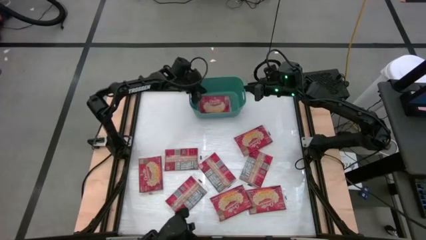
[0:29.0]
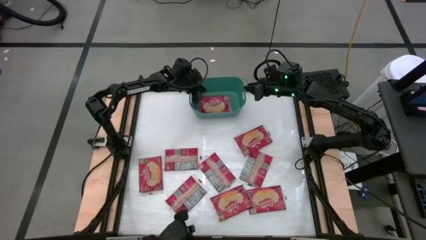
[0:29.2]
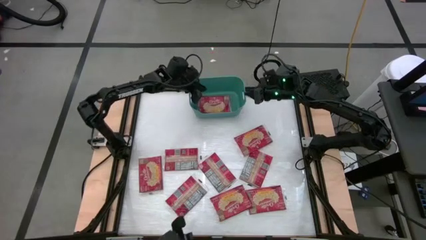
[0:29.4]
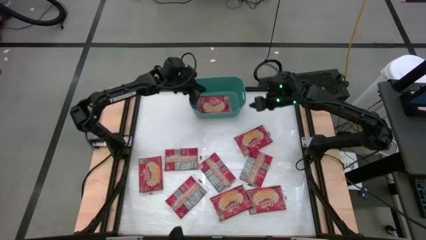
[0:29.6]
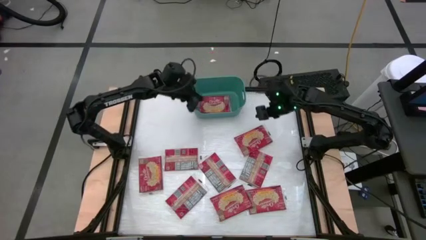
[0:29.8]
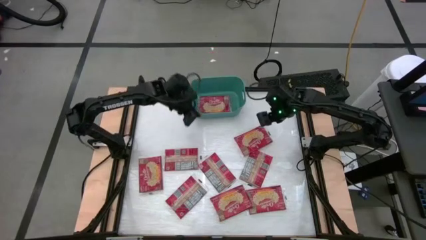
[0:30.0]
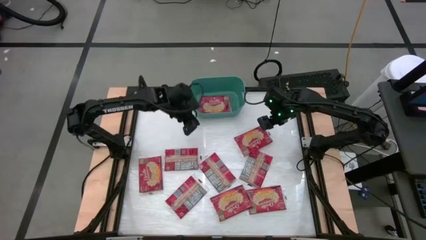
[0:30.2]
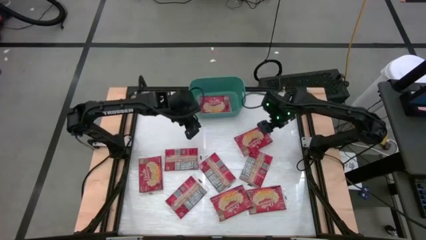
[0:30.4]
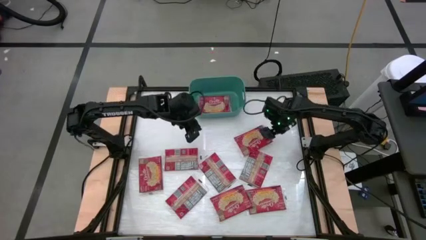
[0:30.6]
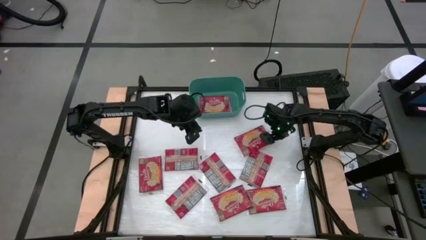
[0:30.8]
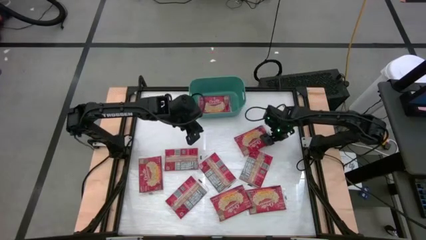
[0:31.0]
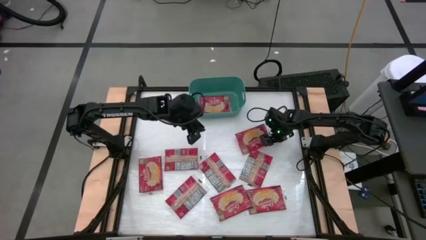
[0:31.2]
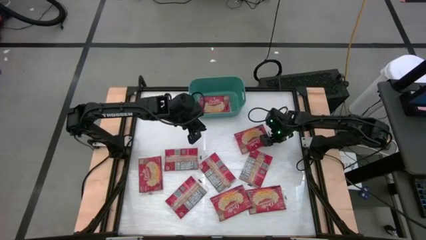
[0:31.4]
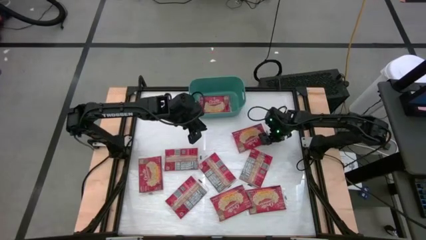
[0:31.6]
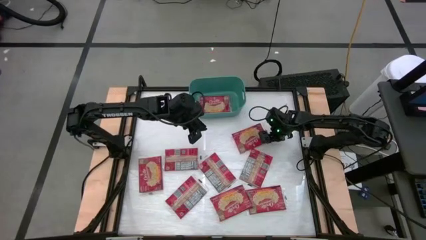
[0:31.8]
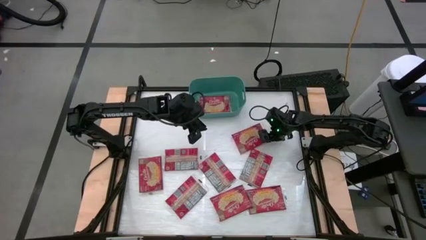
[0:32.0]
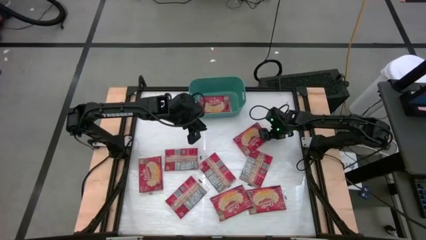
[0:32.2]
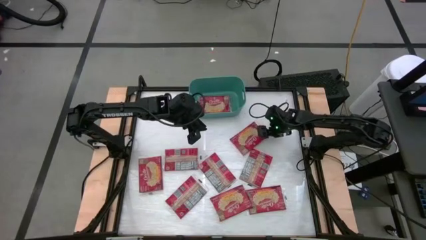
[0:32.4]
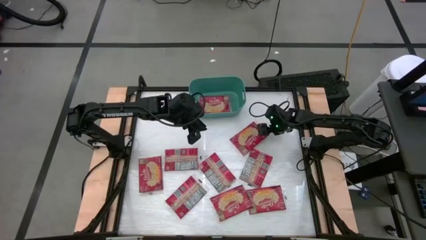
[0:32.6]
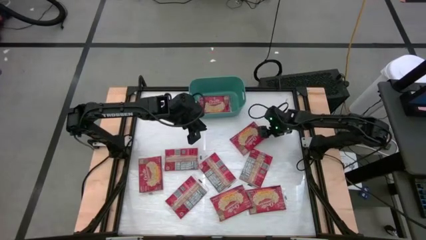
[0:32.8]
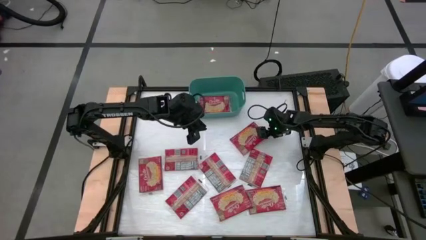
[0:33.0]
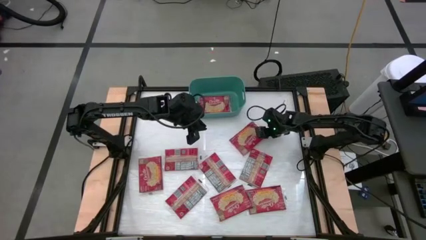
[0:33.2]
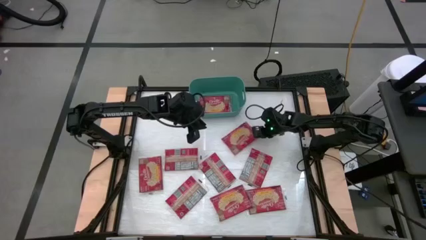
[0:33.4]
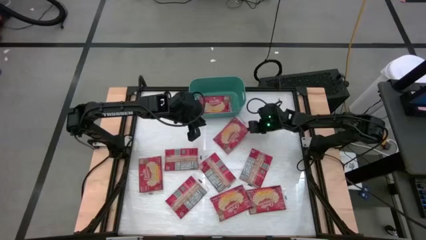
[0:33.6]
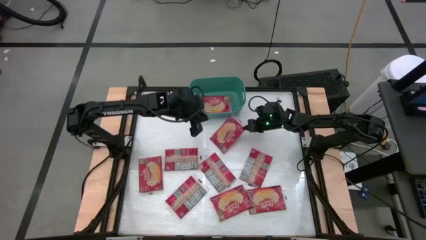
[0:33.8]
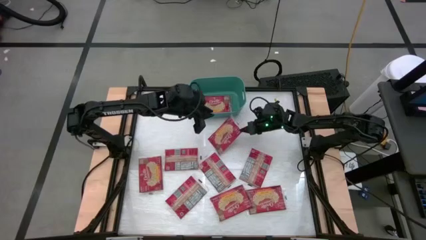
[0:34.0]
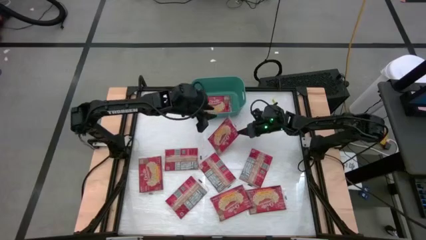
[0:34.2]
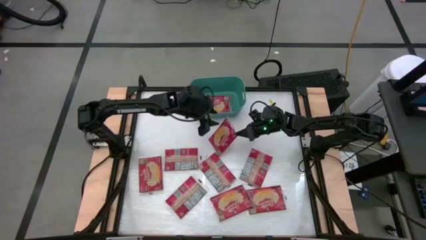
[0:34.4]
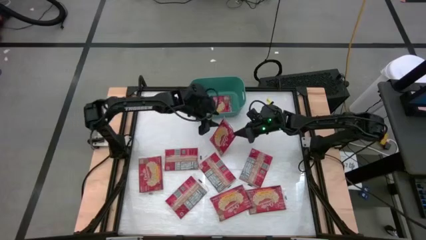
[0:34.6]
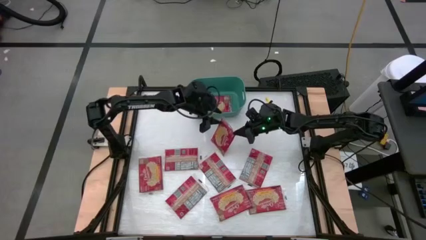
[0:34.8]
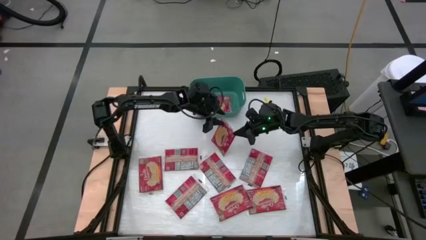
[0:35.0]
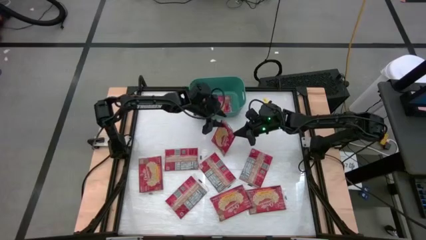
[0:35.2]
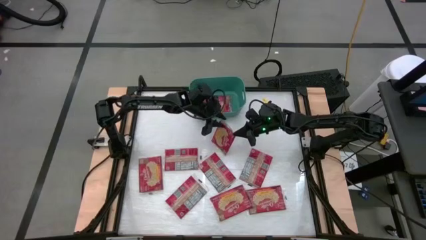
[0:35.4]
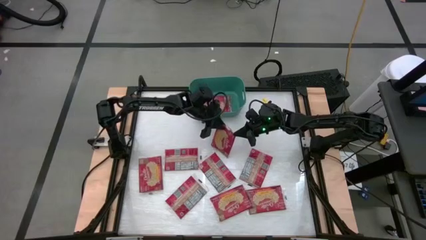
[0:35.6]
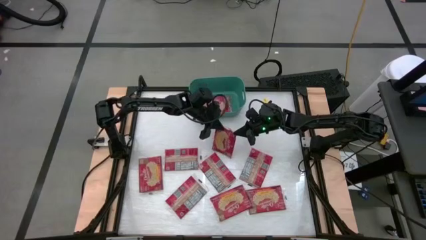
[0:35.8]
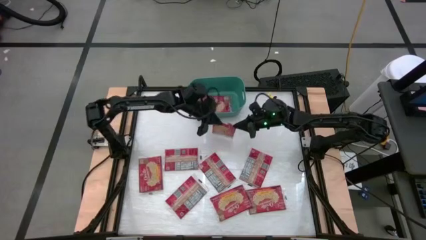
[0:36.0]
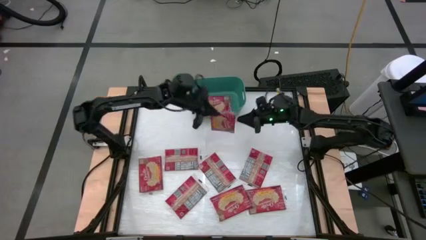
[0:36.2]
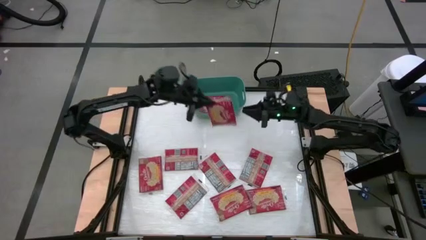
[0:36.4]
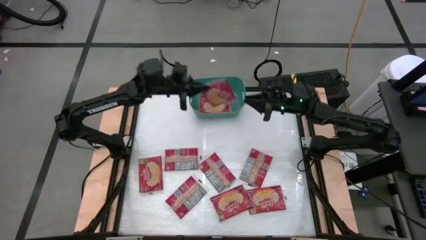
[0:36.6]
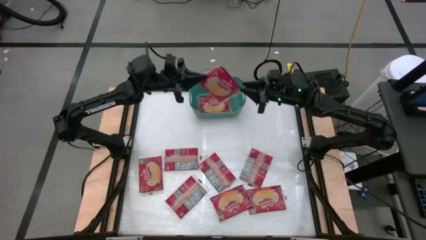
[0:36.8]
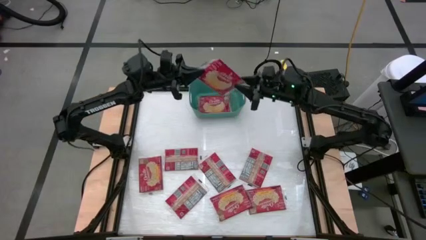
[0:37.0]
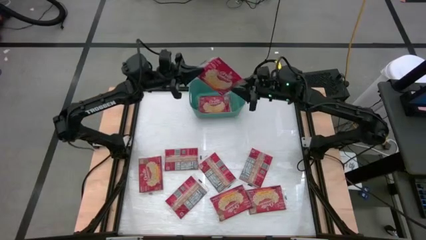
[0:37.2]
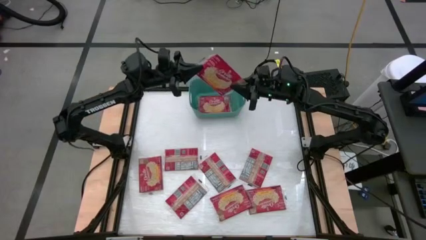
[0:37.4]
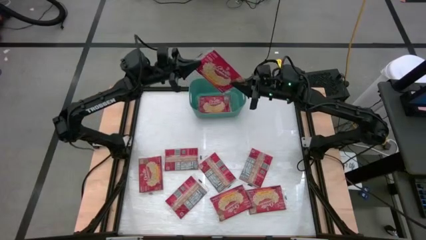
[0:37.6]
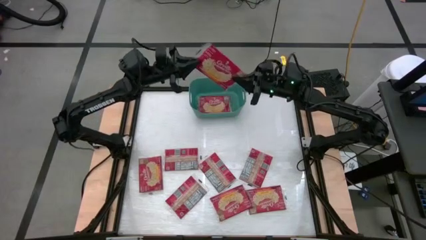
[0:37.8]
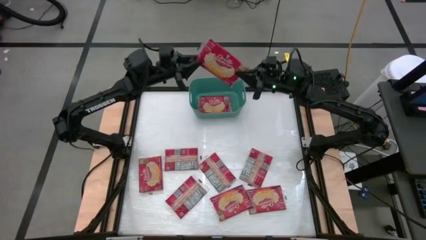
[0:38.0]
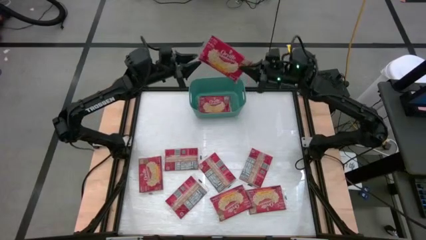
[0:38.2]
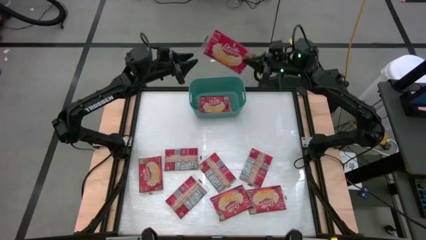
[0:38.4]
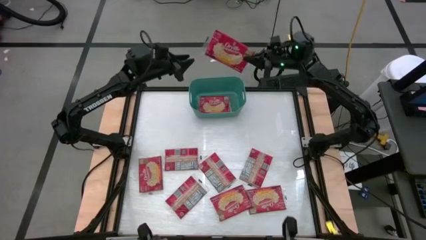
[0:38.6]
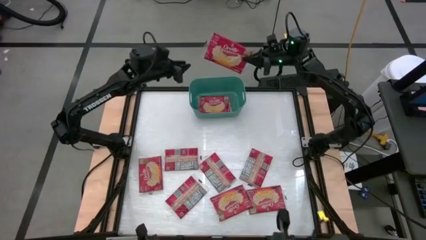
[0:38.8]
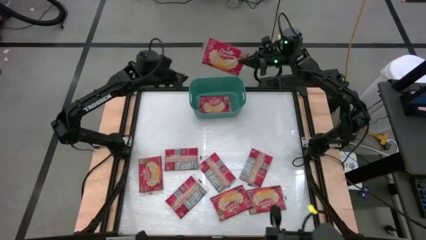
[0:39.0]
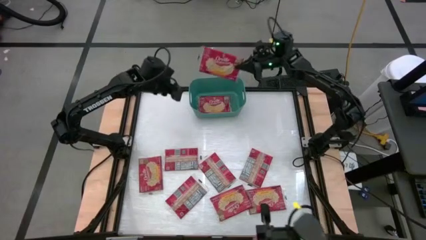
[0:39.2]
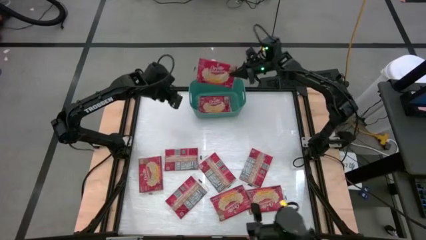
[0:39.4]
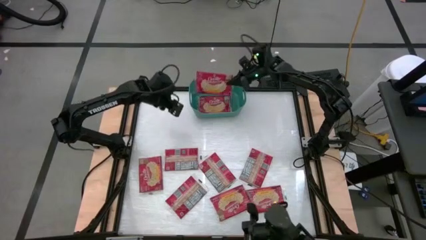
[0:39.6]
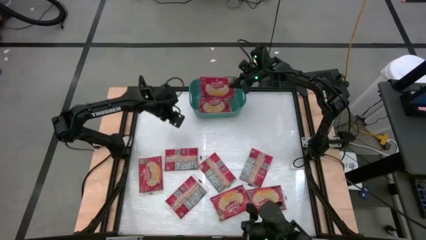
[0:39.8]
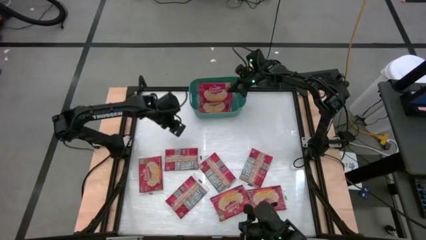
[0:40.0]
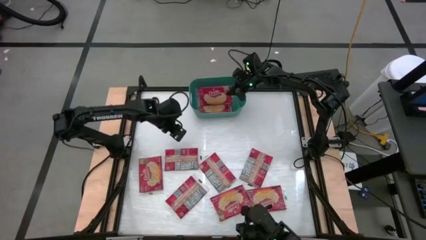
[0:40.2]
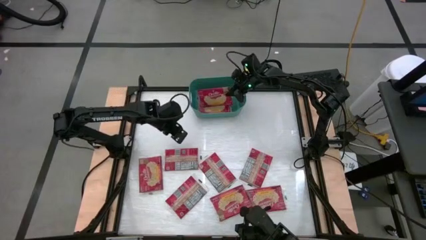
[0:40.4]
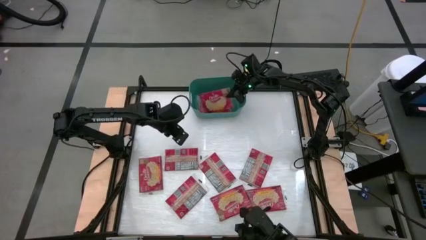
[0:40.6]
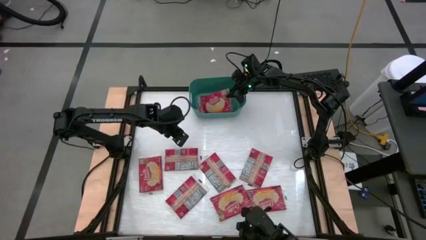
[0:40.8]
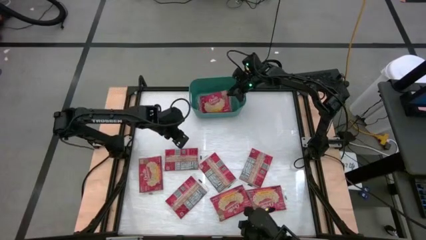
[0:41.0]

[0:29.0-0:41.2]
Task: Sort popcorn bags into baskets
Put the red popcorn pack into the green bin

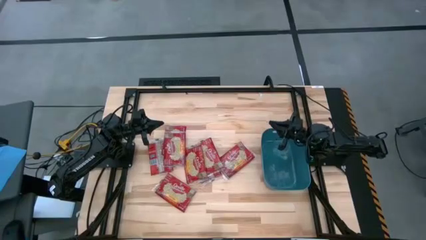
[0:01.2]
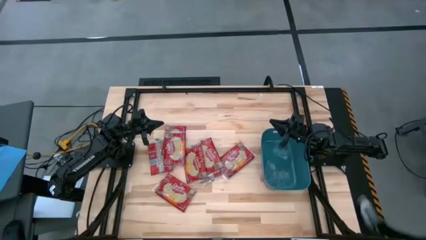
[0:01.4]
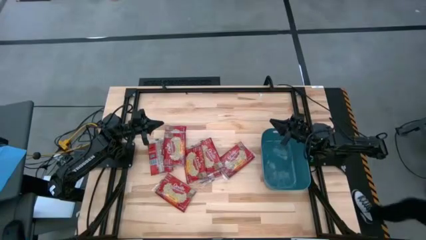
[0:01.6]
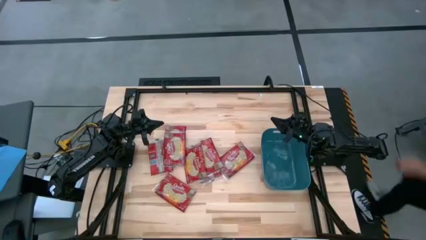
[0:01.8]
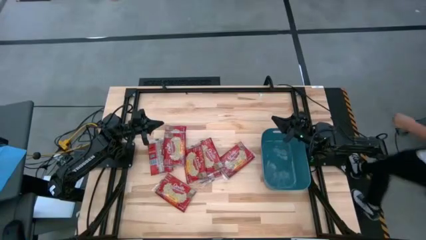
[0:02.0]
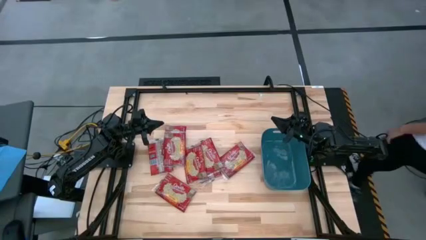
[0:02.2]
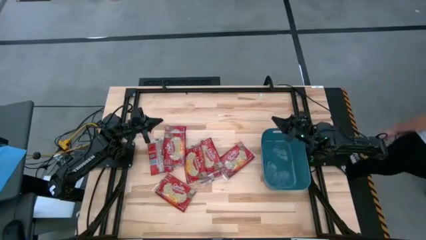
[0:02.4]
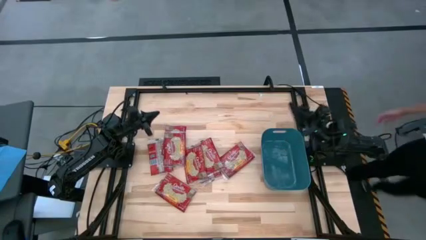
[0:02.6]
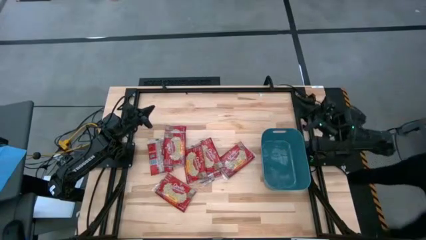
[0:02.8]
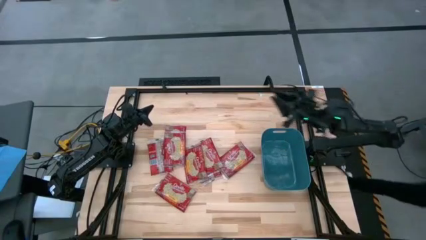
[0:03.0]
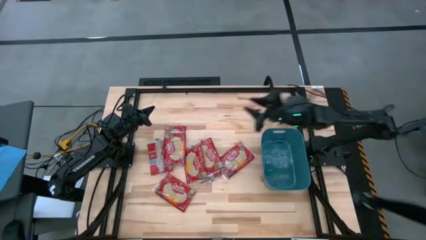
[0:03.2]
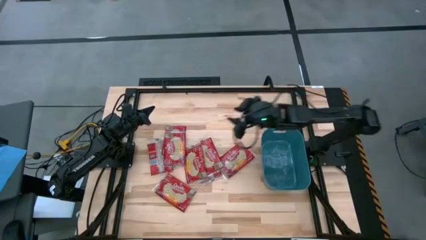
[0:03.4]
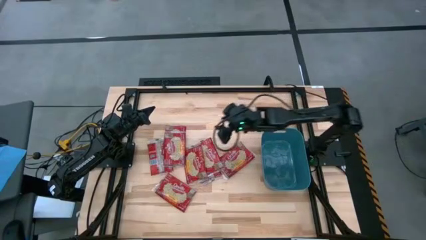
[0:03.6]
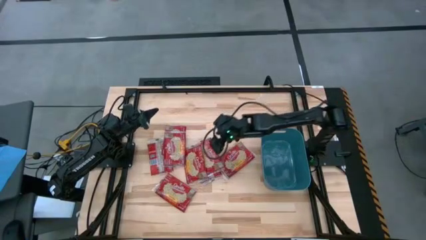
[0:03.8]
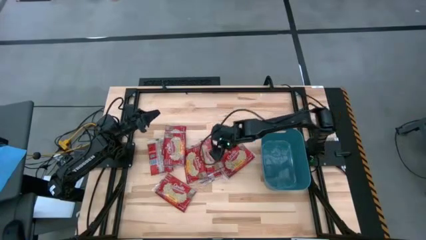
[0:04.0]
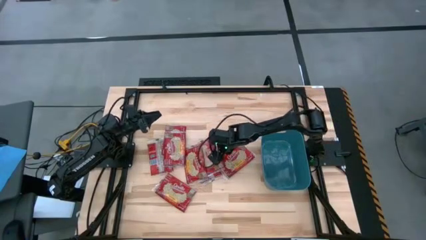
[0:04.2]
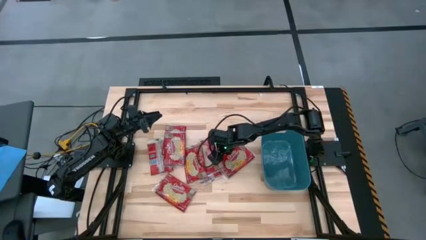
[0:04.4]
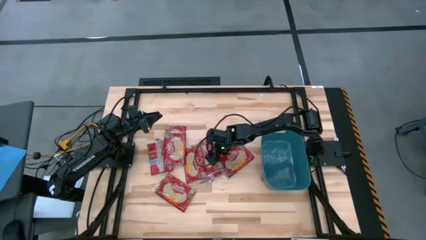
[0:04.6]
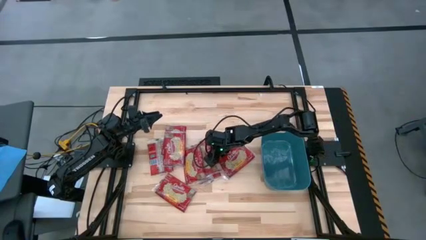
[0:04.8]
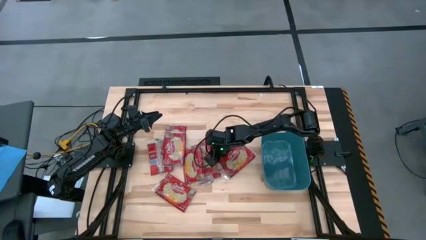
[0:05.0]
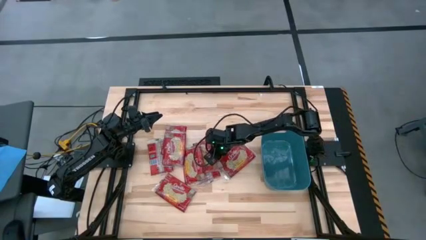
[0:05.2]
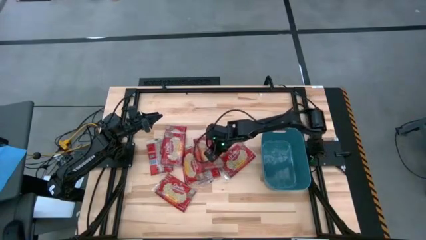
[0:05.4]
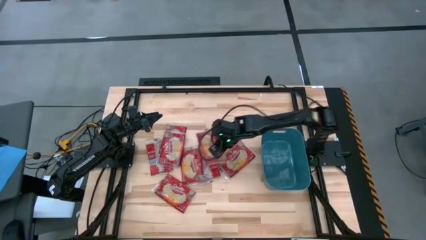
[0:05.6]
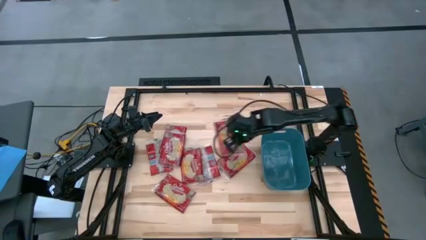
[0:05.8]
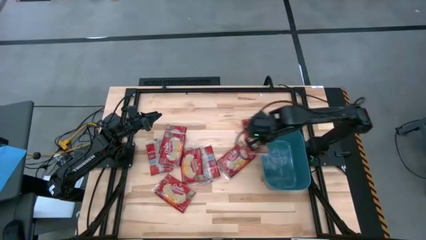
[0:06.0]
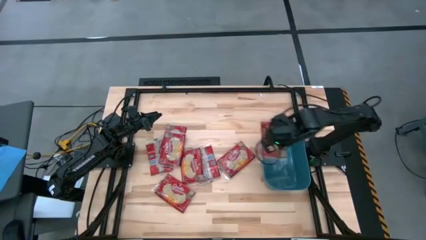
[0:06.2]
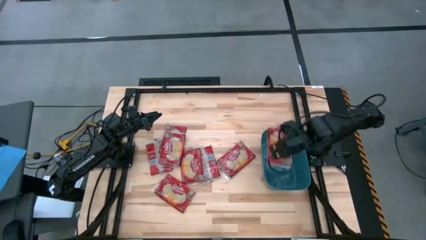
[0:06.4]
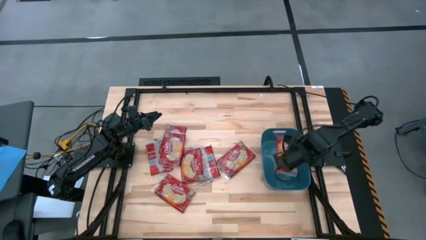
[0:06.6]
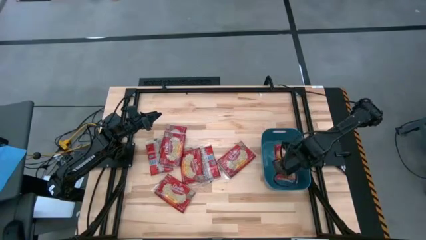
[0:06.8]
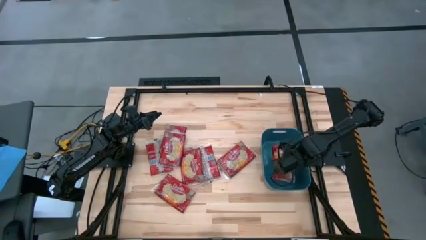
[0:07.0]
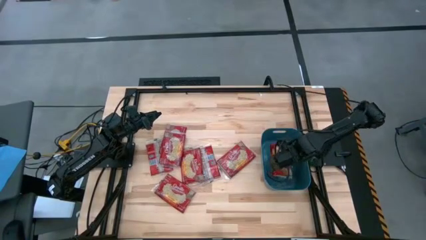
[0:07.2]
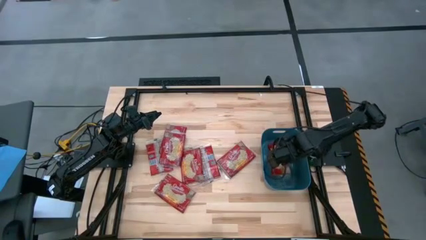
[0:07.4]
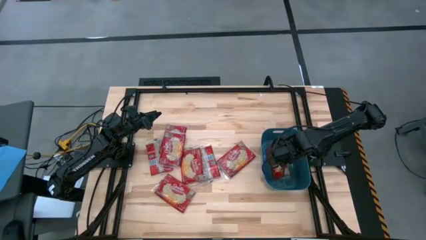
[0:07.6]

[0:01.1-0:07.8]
Task: Sort popcorn bags into baskets
Put the popcorn bag into the blue bin
